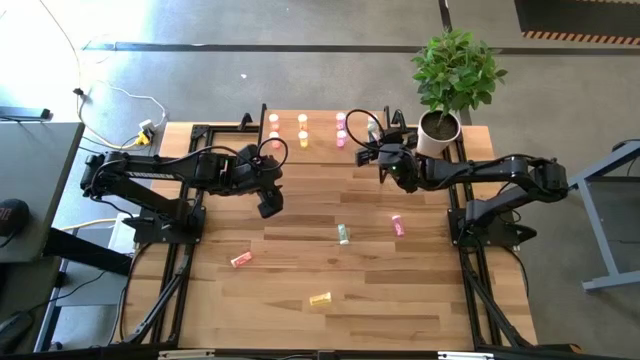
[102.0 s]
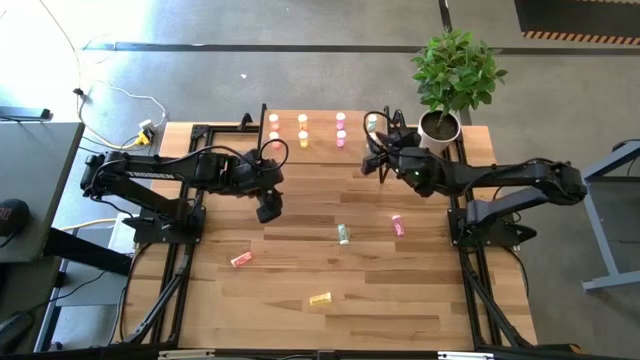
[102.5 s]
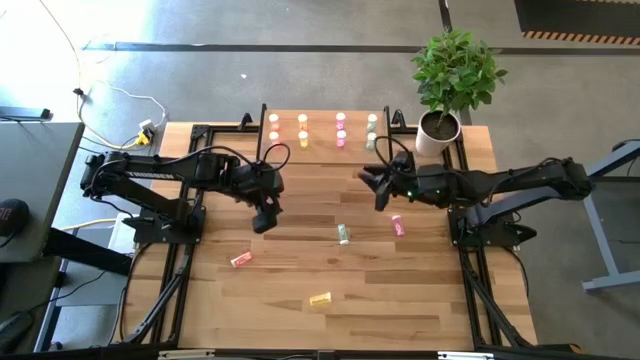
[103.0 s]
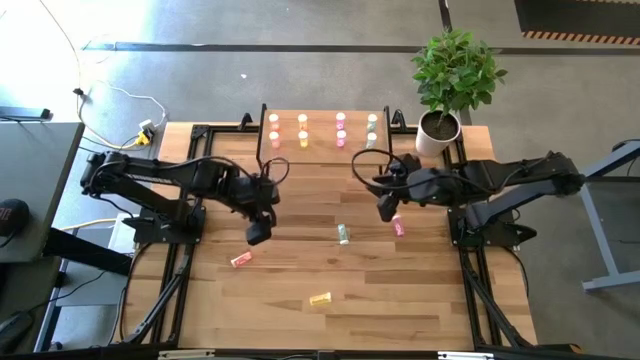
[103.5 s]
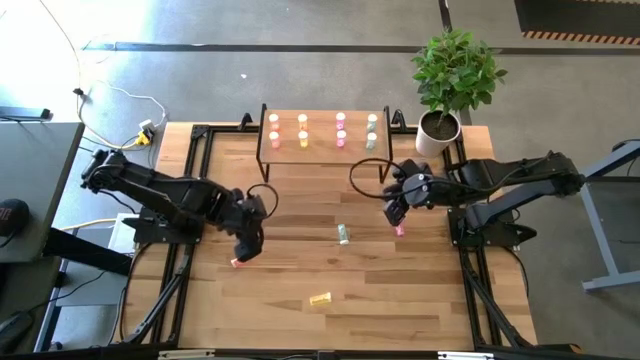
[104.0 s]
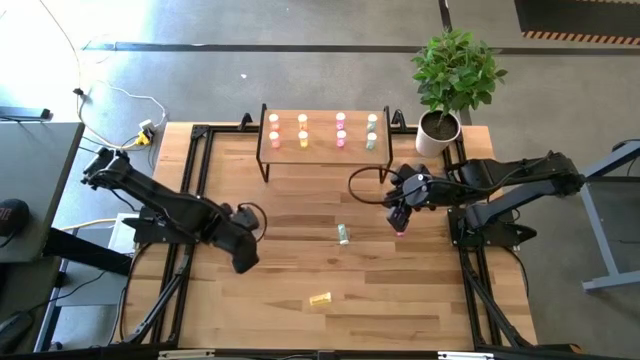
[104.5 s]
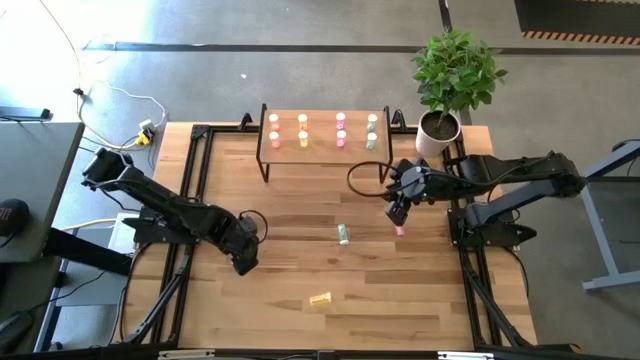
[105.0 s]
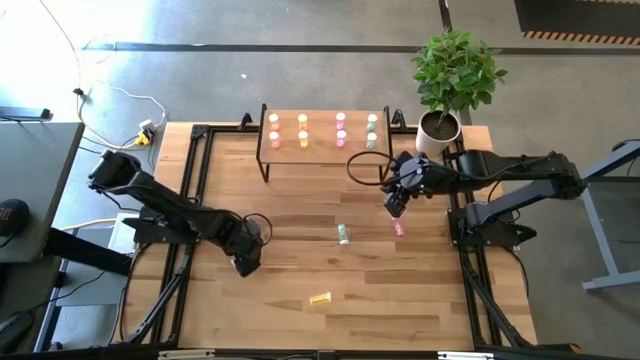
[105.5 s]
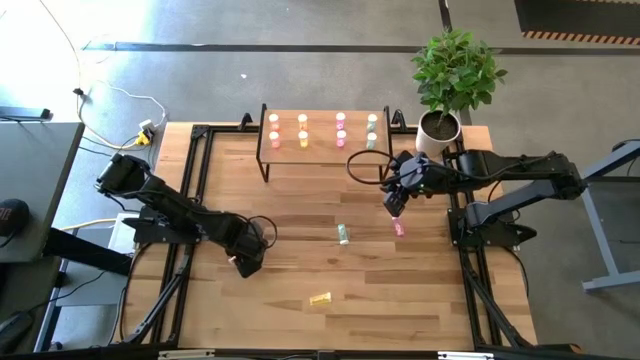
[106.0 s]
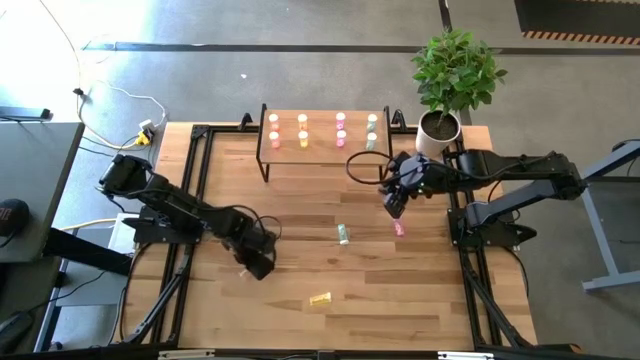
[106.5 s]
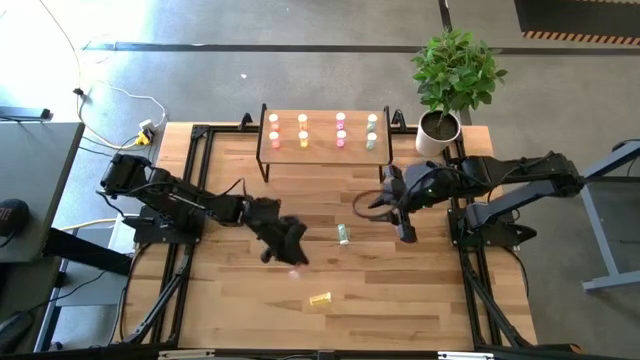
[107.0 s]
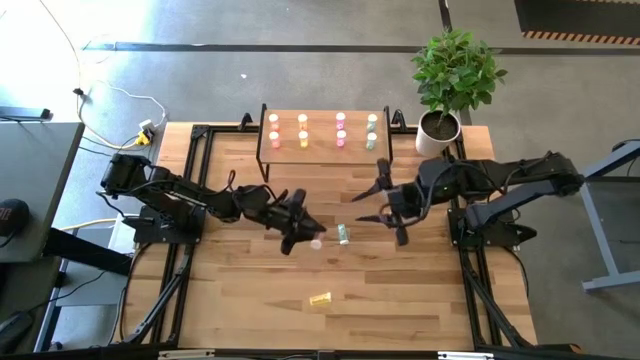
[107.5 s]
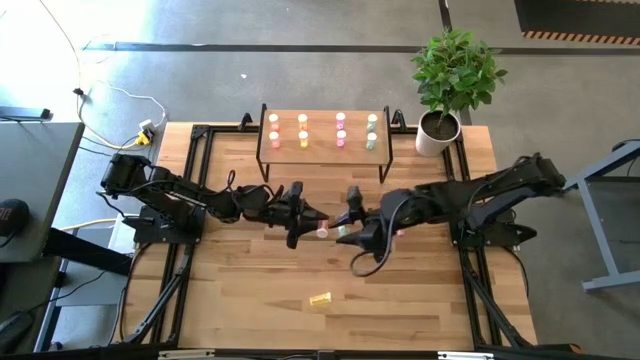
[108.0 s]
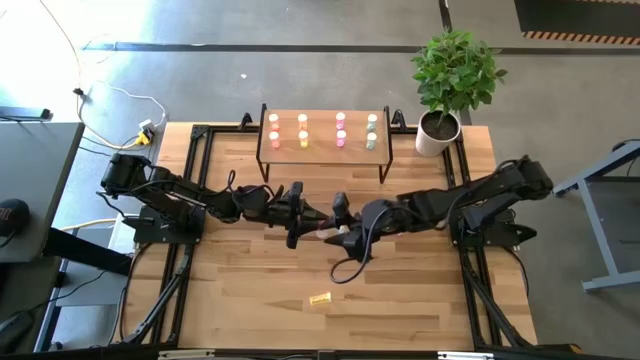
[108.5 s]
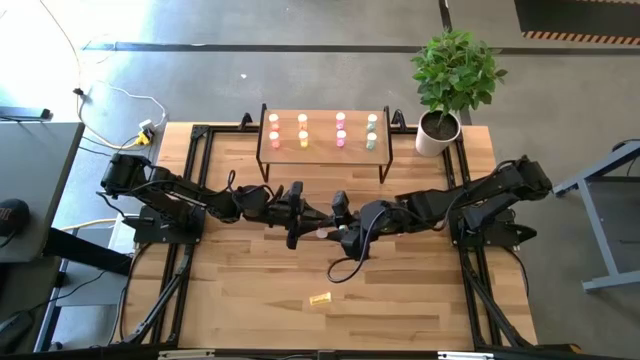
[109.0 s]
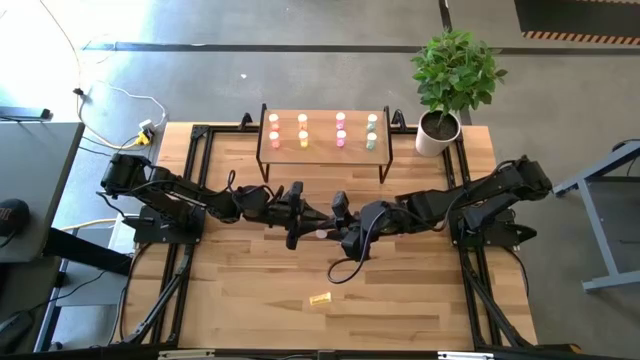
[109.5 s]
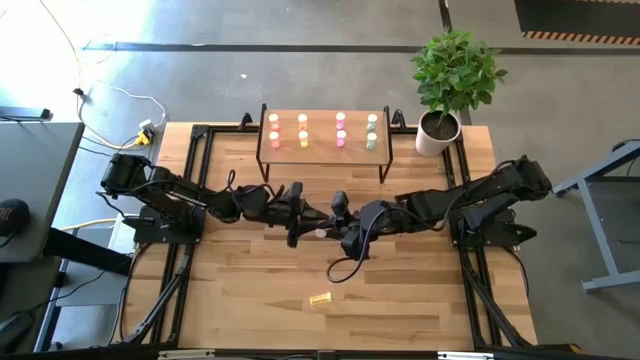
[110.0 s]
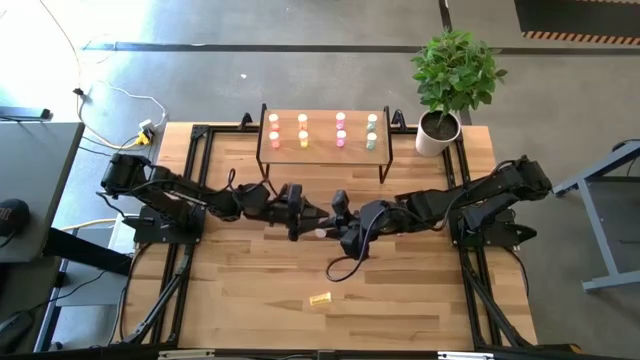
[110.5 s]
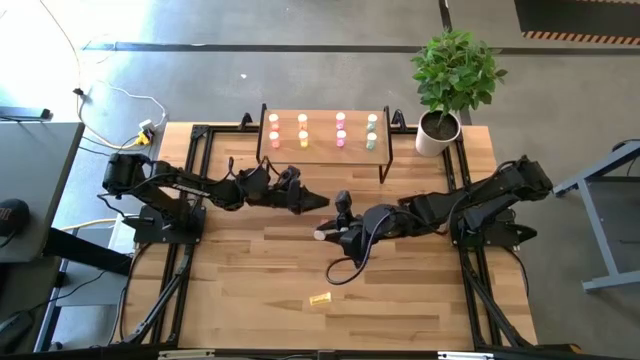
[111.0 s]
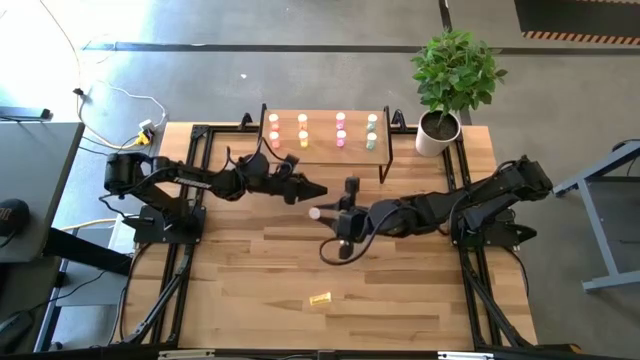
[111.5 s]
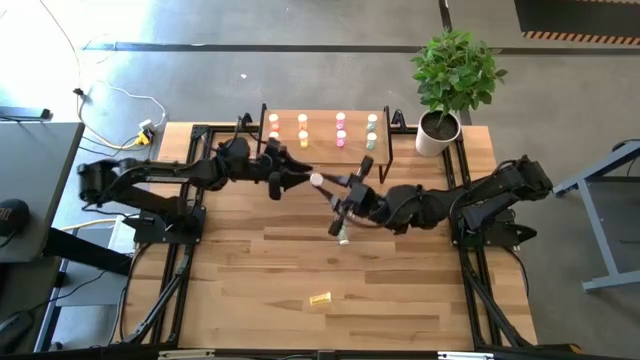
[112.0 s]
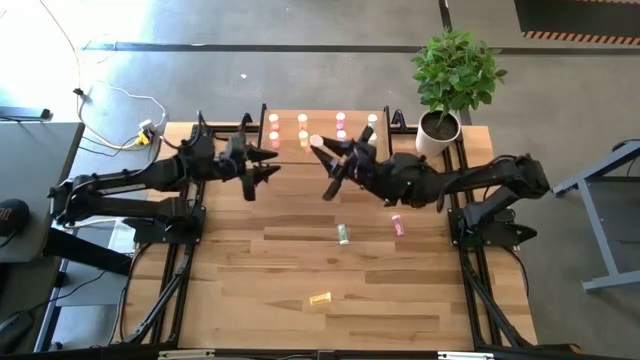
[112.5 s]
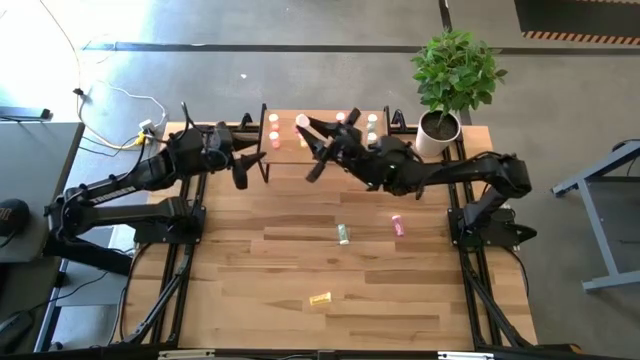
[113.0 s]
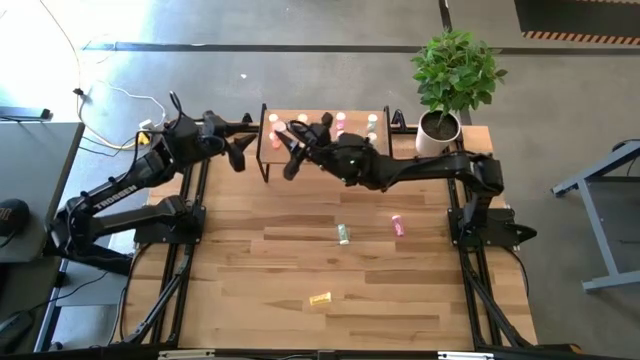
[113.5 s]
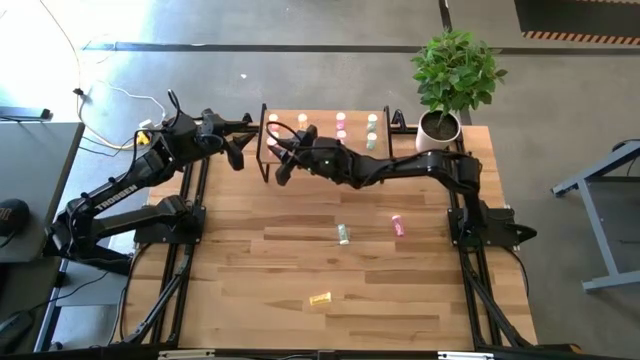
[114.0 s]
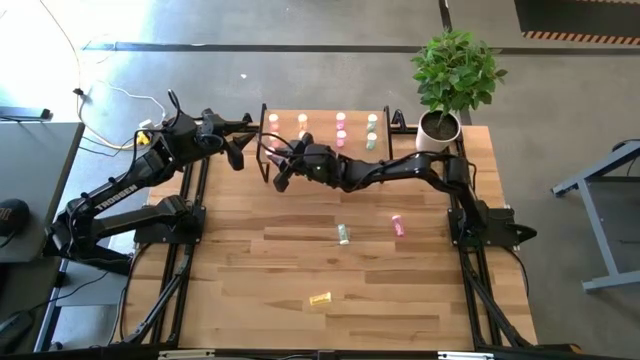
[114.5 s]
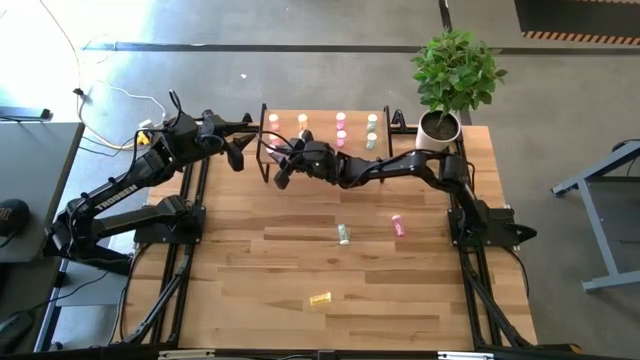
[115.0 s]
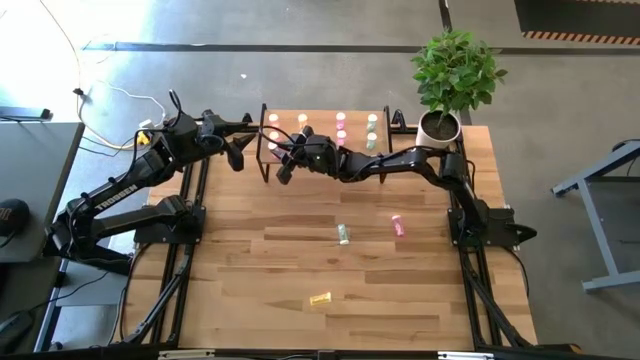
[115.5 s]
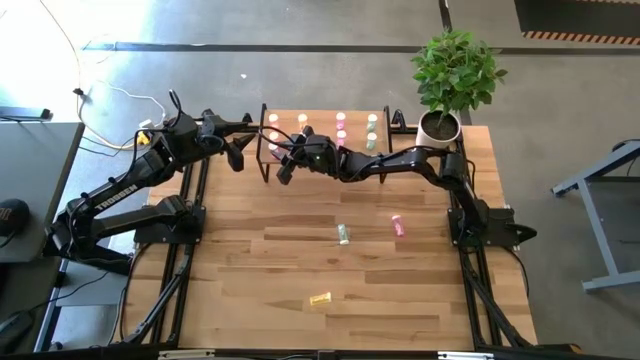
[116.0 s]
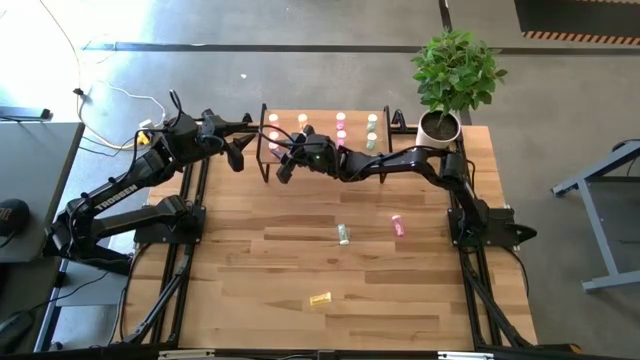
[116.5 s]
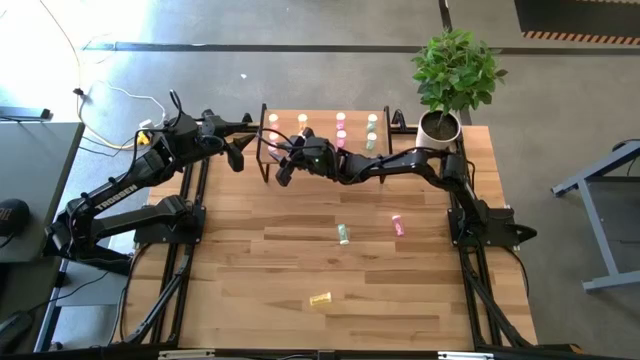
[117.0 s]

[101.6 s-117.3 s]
Task: Pick and place medicine bottles onto shelf by color
Put the pink pill bottle on the shelf aligned with the other pink pill bottles

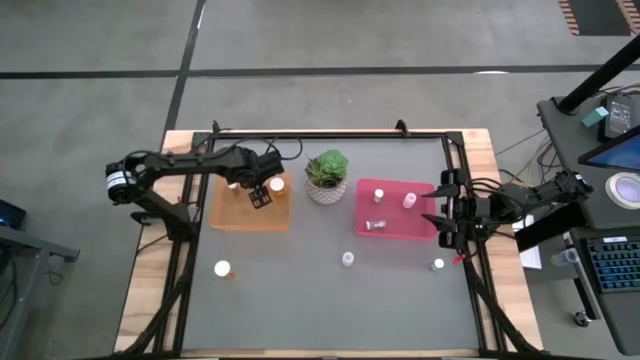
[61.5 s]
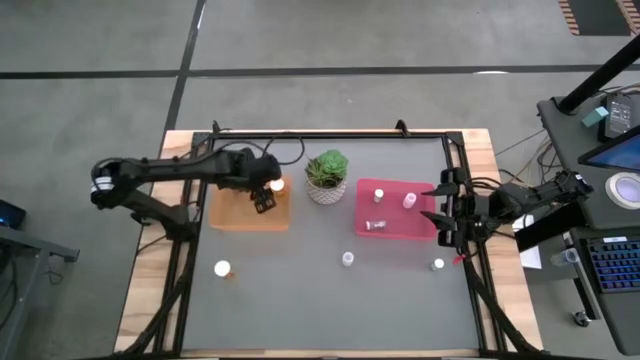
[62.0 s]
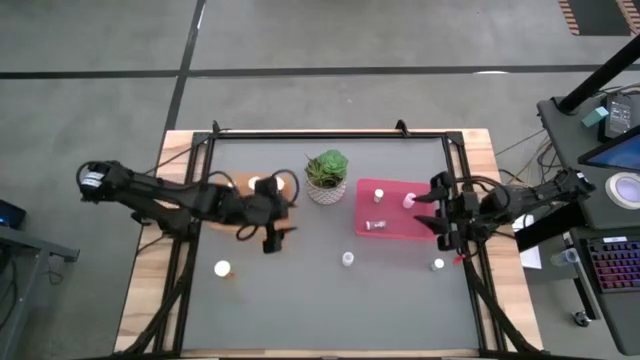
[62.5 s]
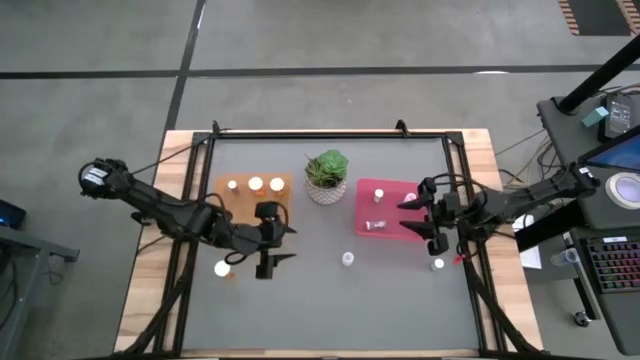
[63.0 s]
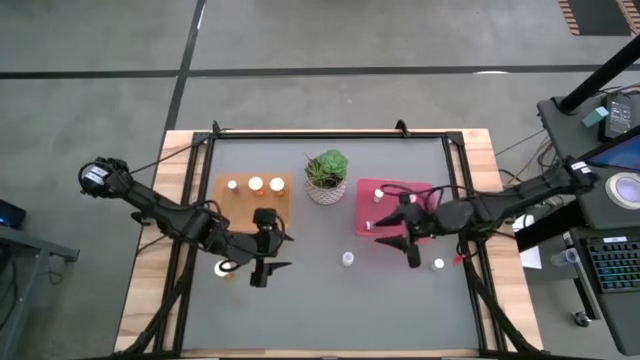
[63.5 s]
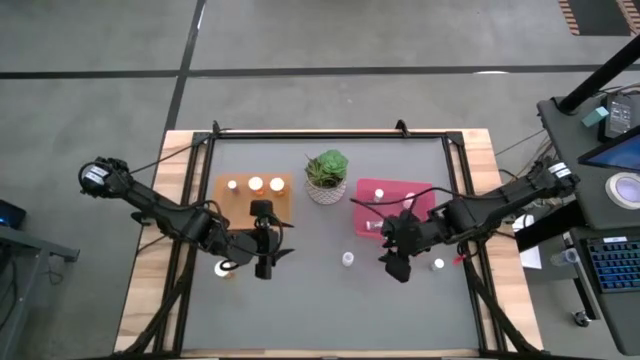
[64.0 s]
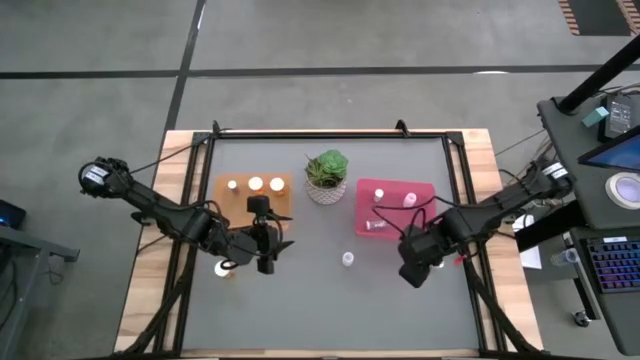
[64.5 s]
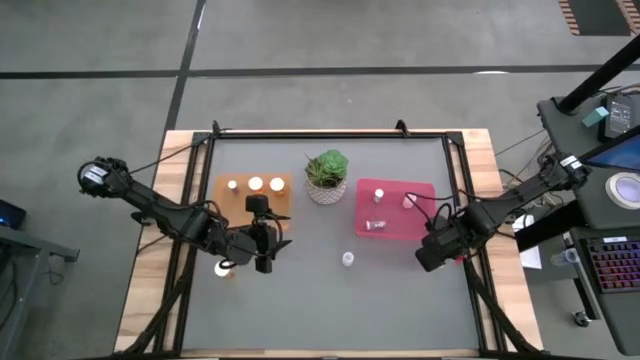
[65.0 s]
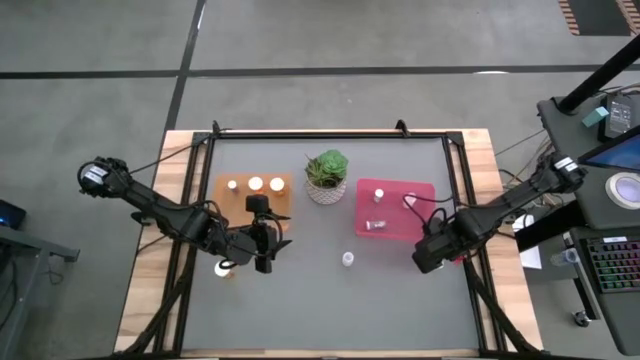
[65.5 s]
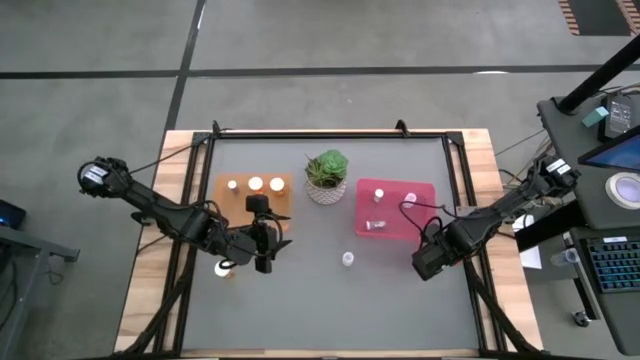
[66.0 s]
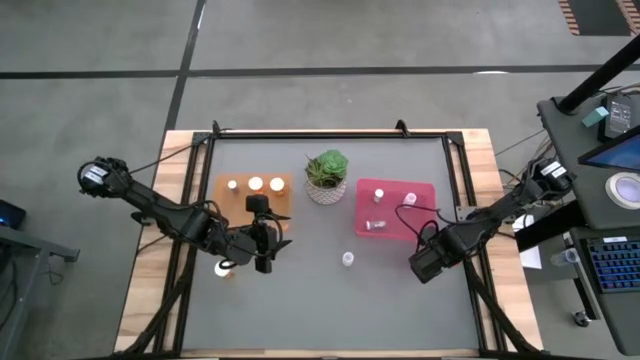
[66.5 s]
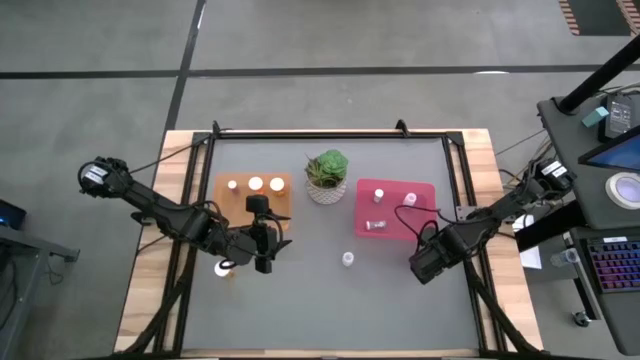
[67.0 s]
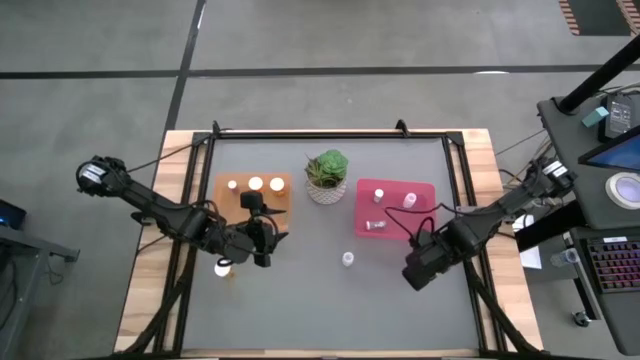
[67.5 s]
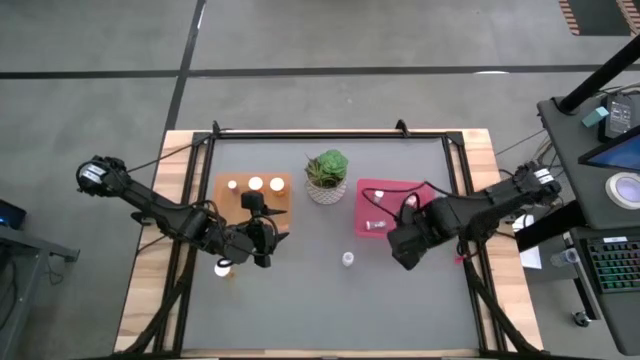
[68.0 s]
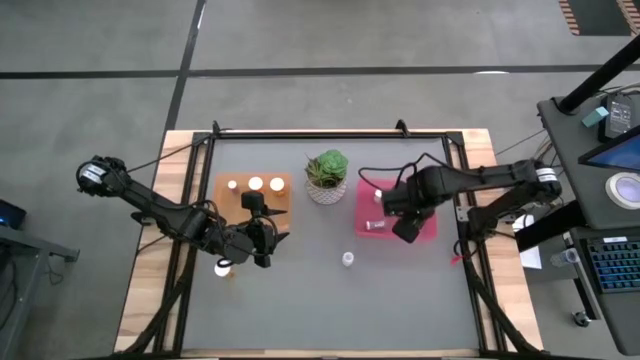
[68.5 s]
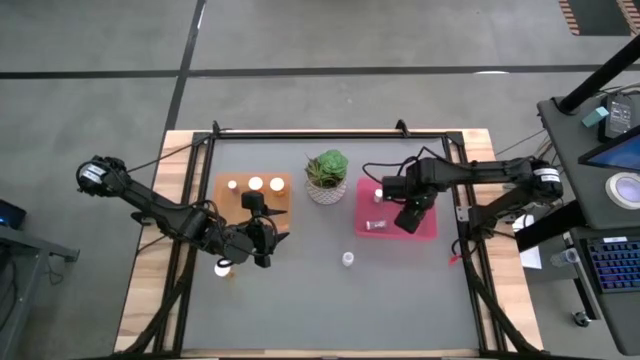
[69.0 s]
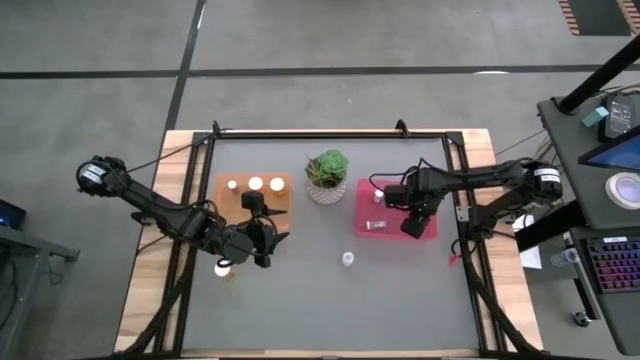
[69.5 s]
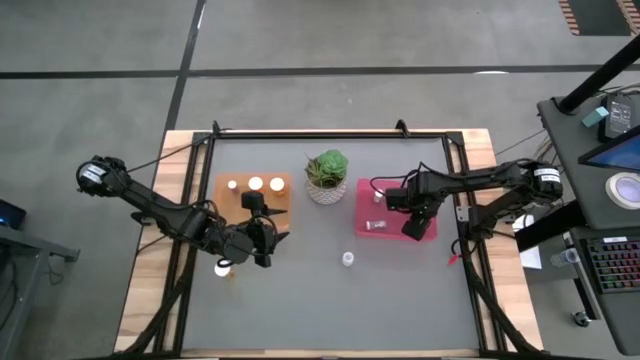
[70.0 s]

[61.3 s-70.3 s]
Task: Pick and place medicine bottles into bin by pill shape (circle, oval)
Put the small blue pill bottle in the pink bin
